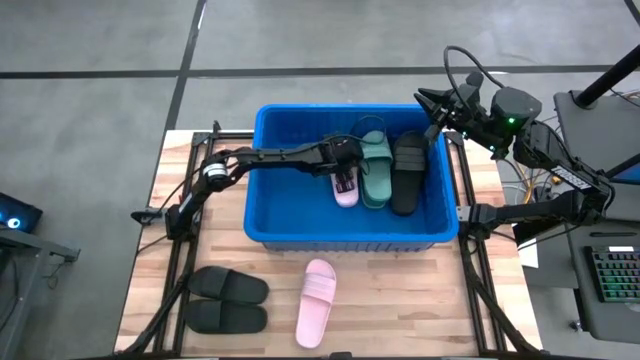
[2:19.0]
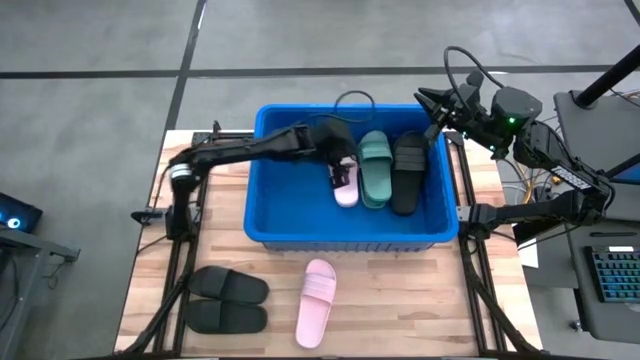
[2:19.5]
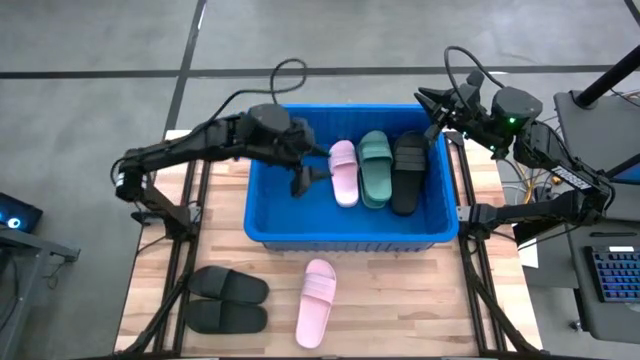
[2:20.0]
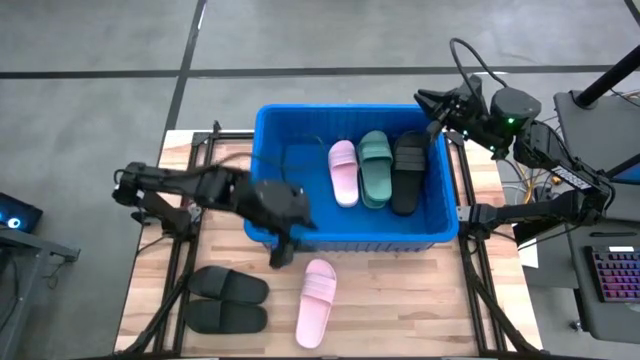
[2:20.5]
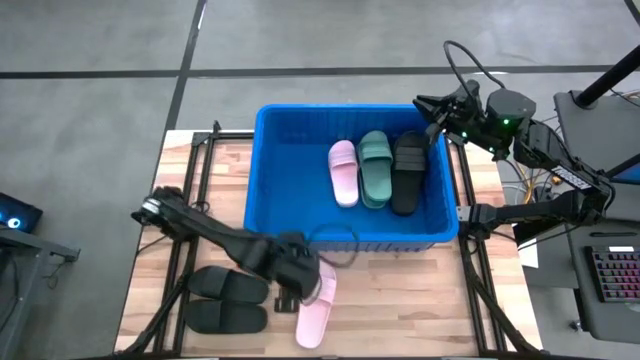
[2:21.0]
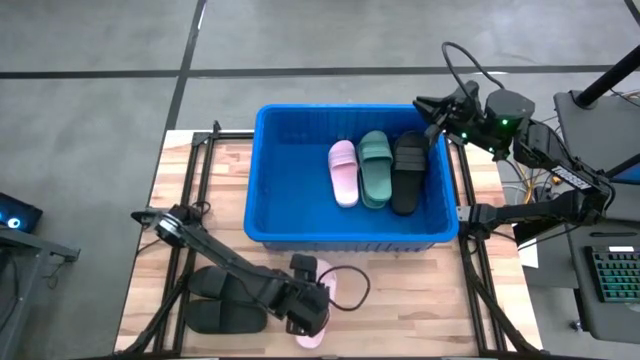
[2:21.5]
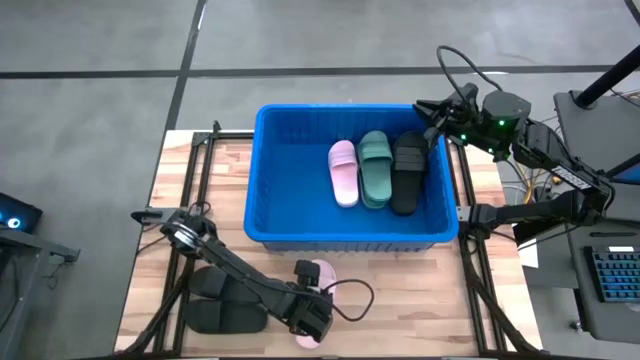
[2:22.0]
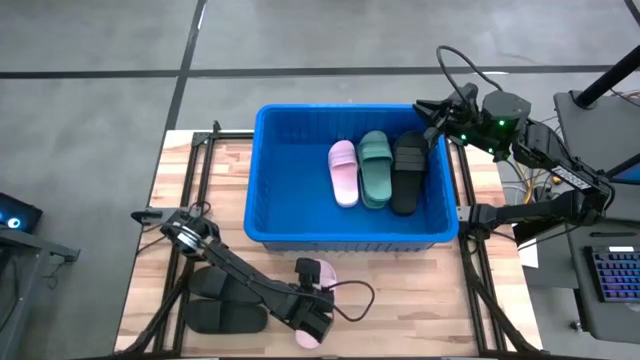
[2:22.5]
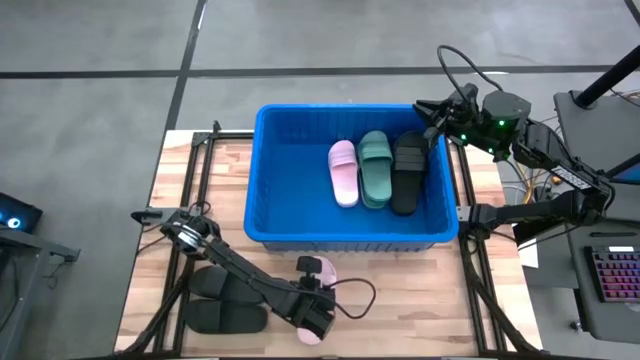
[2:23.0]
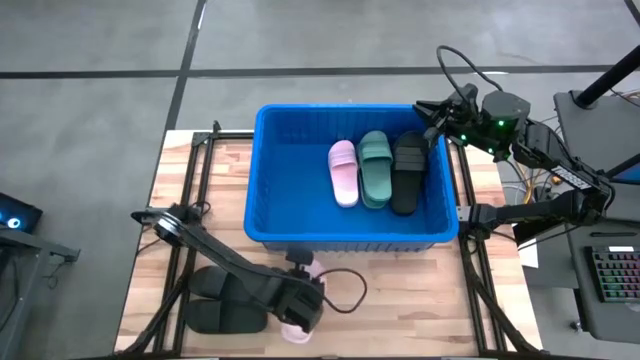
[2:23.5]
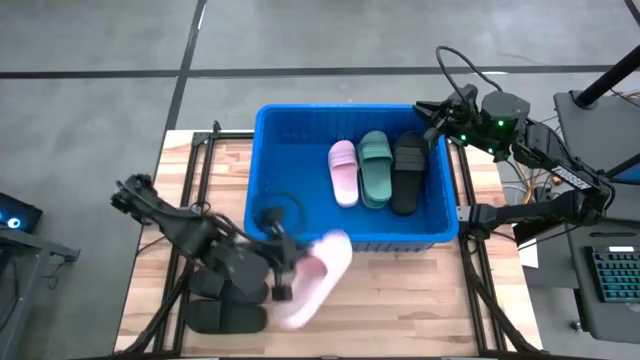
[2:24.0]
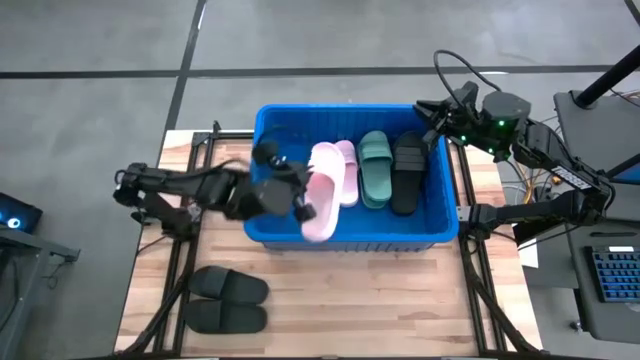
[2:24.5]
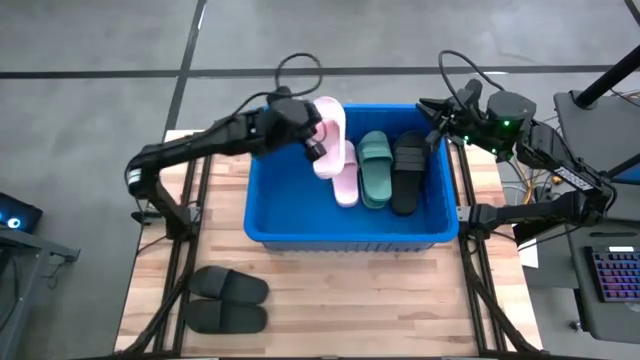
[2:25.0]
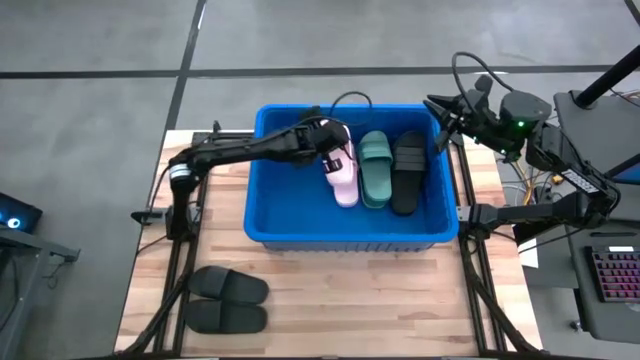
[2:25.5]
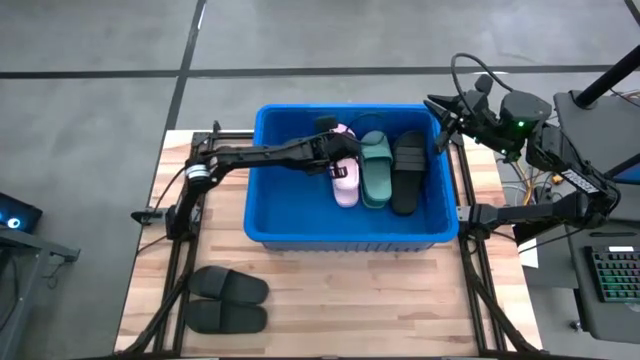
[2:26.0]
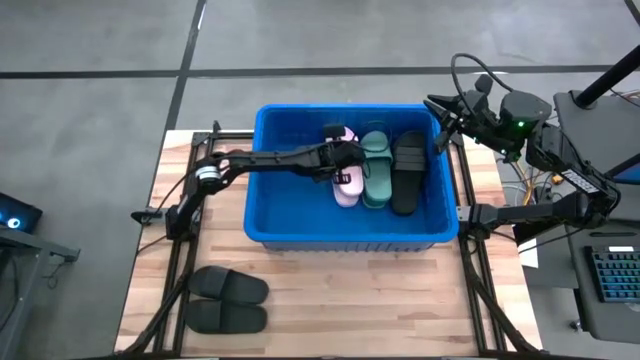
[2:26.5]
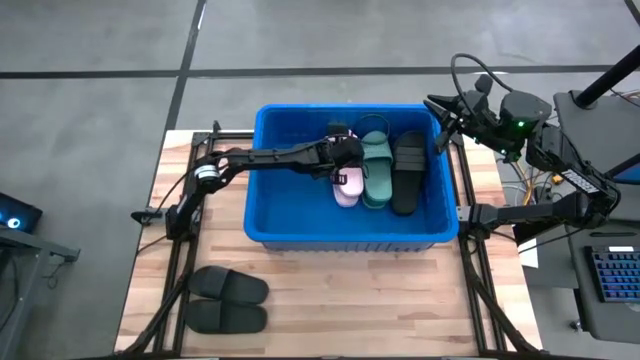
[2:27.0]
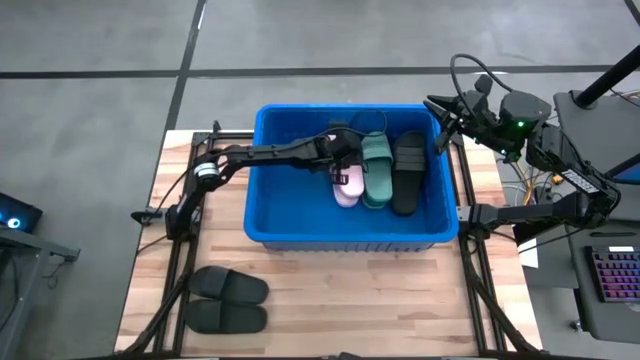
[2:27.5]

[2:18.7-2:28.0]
Task: Pick and place slides into bin
Put the pink slide into the blue bin

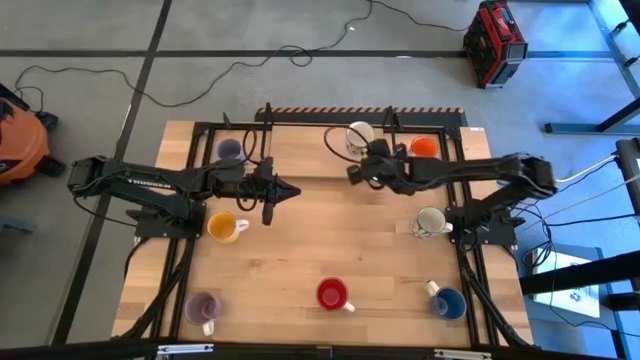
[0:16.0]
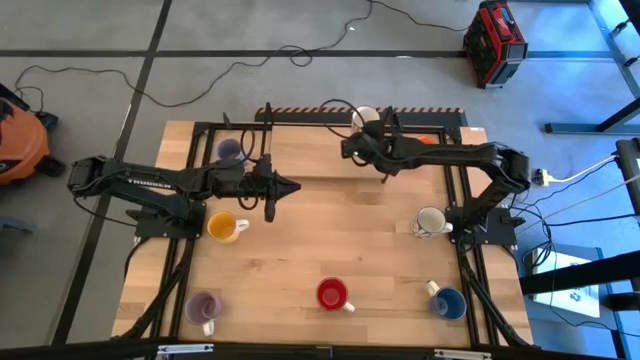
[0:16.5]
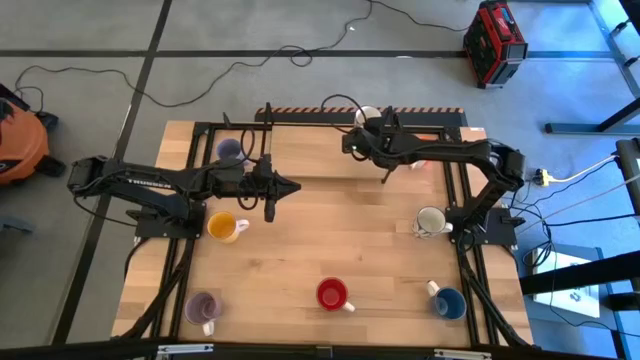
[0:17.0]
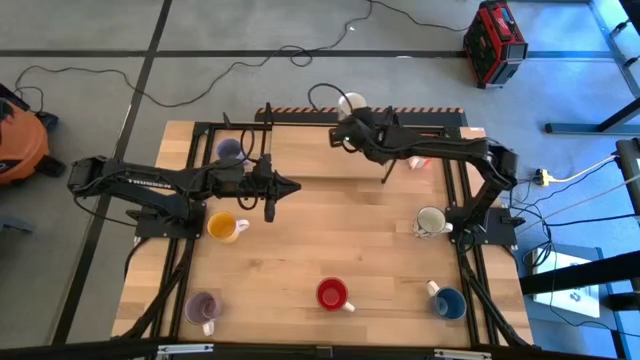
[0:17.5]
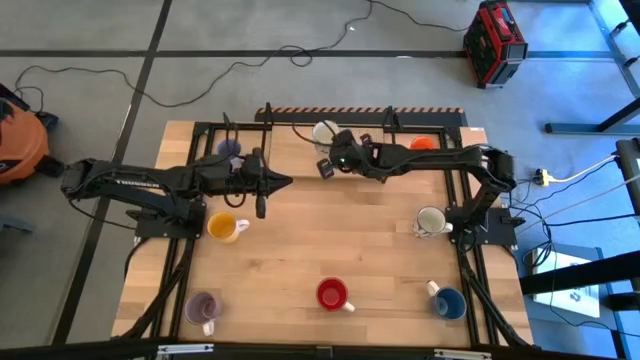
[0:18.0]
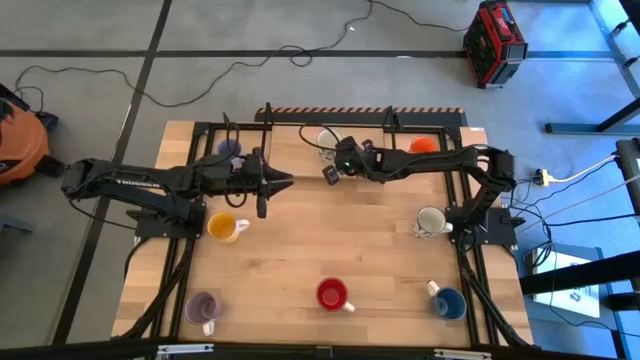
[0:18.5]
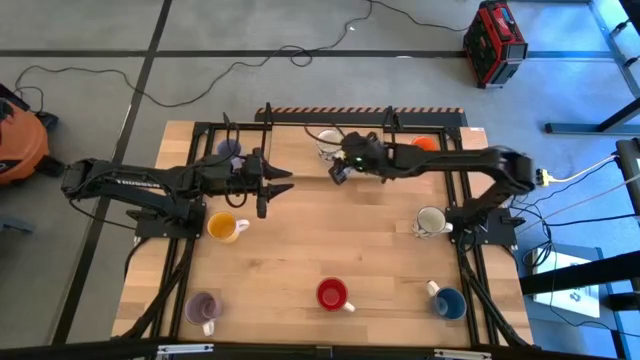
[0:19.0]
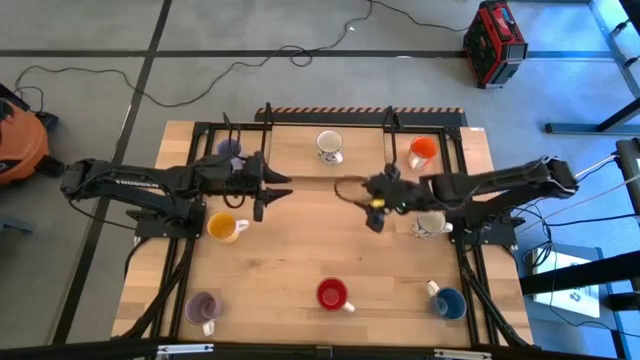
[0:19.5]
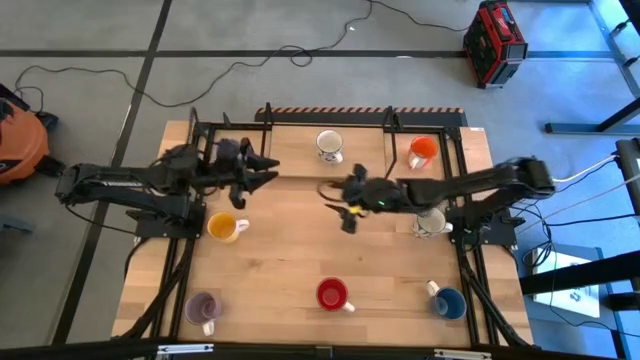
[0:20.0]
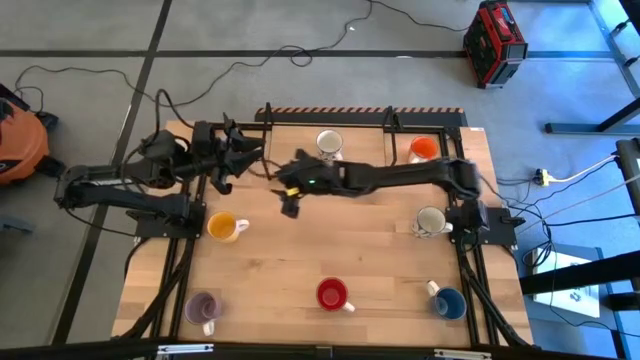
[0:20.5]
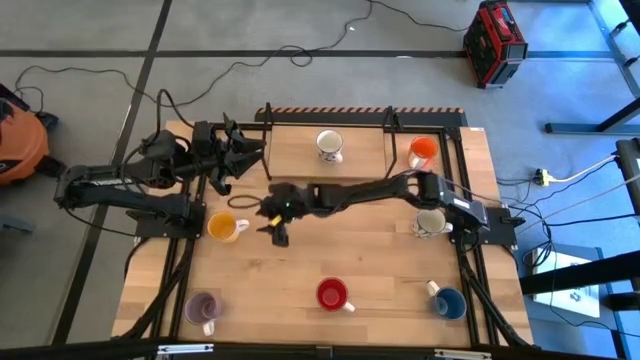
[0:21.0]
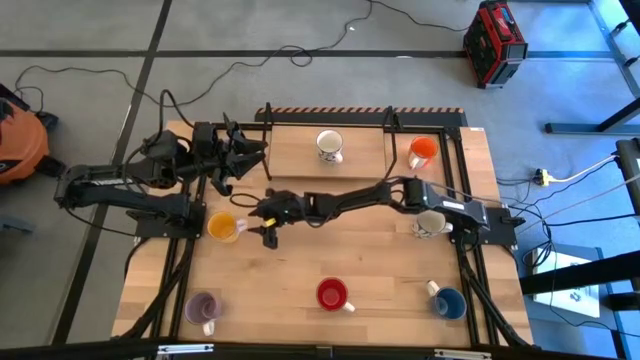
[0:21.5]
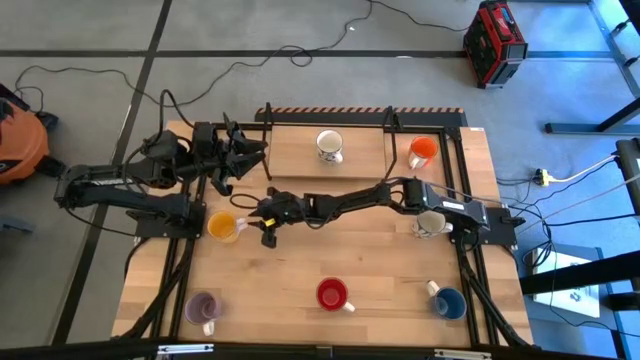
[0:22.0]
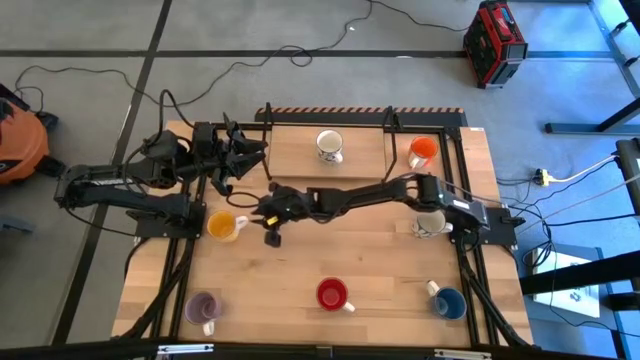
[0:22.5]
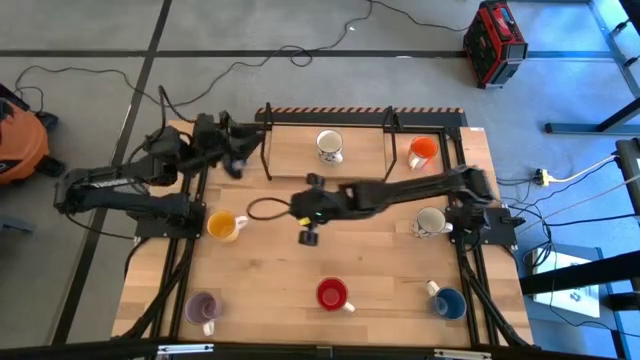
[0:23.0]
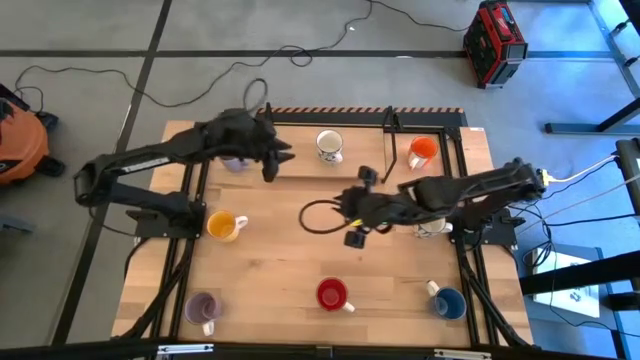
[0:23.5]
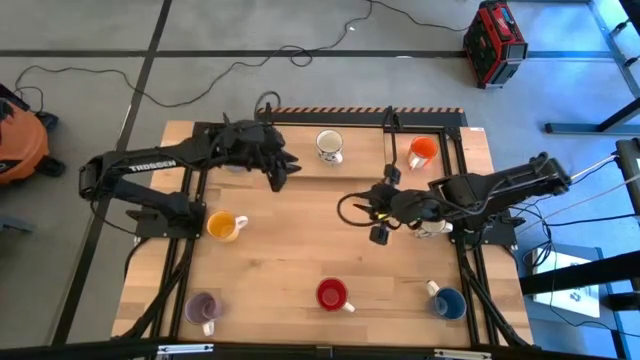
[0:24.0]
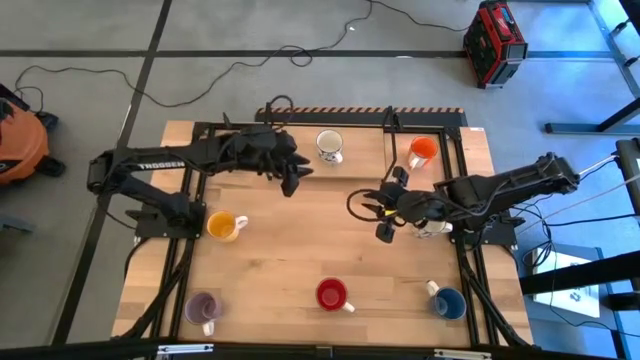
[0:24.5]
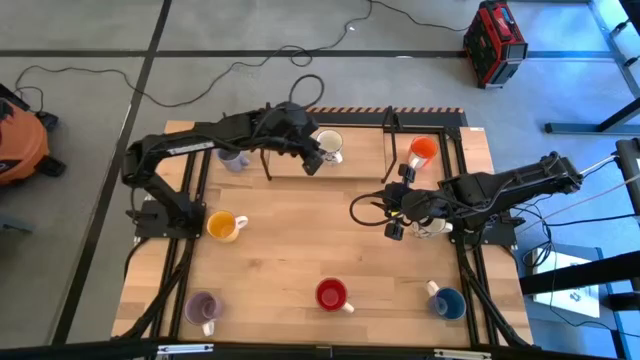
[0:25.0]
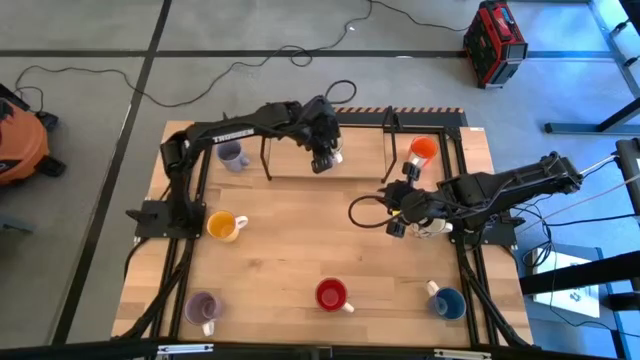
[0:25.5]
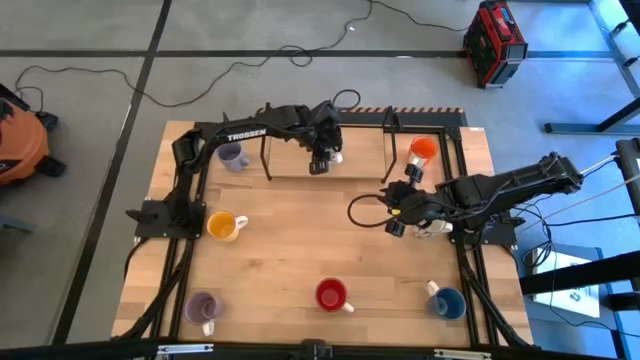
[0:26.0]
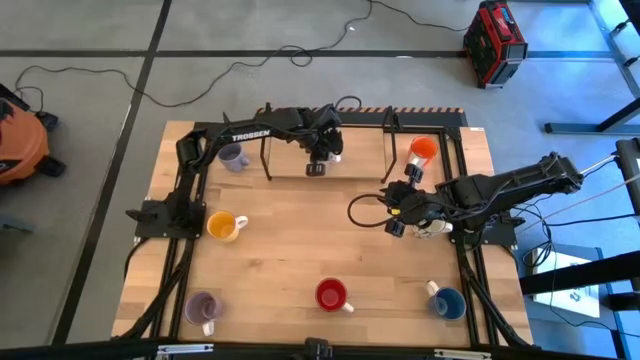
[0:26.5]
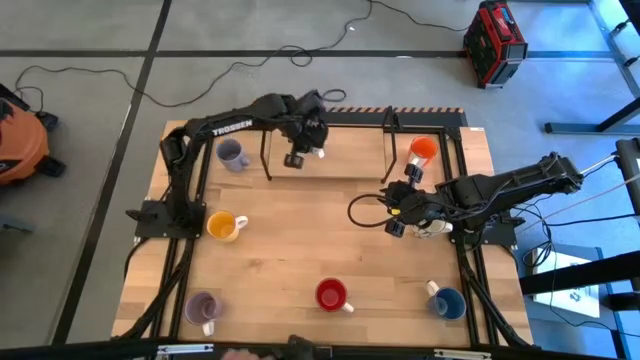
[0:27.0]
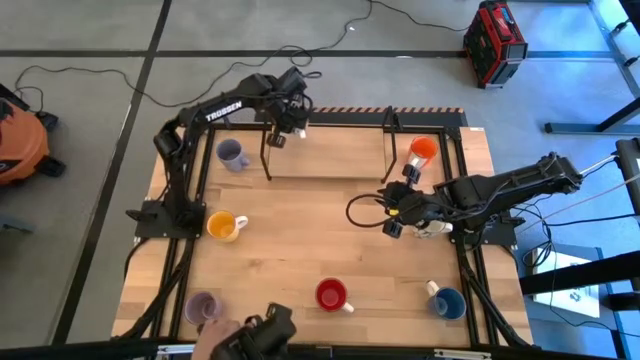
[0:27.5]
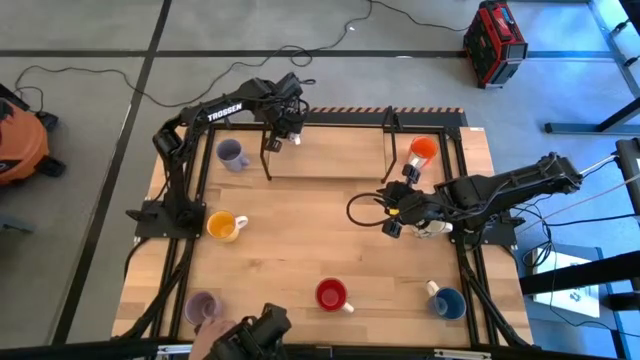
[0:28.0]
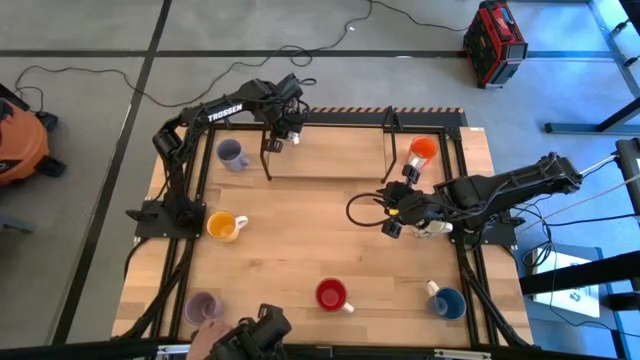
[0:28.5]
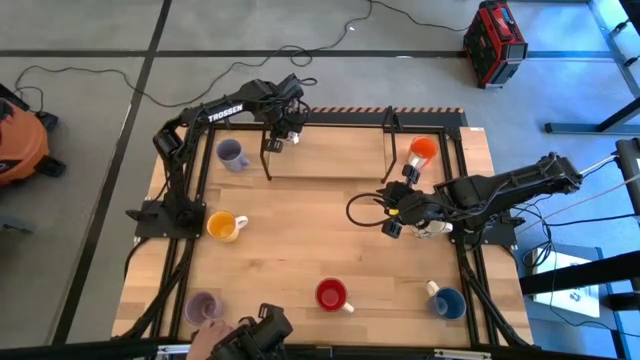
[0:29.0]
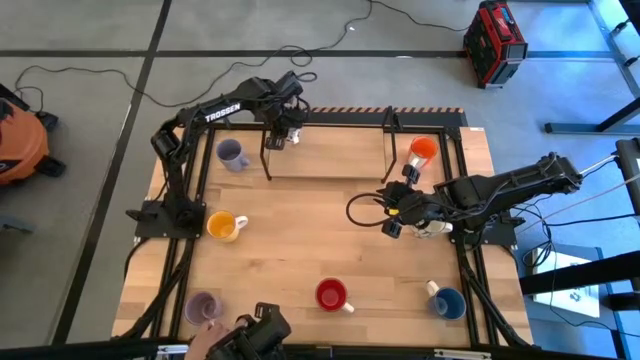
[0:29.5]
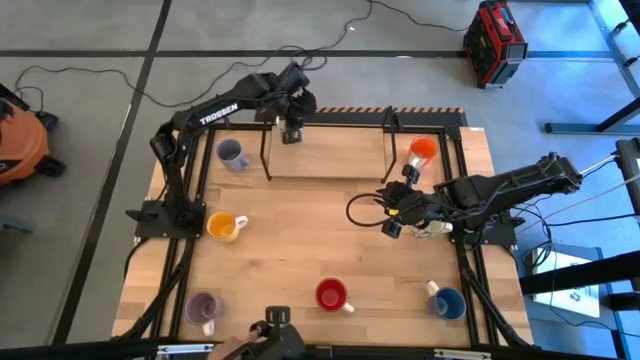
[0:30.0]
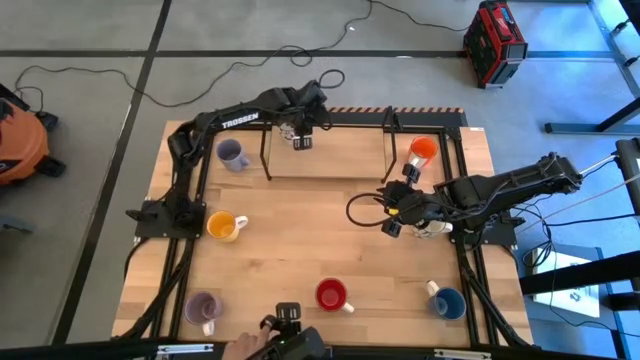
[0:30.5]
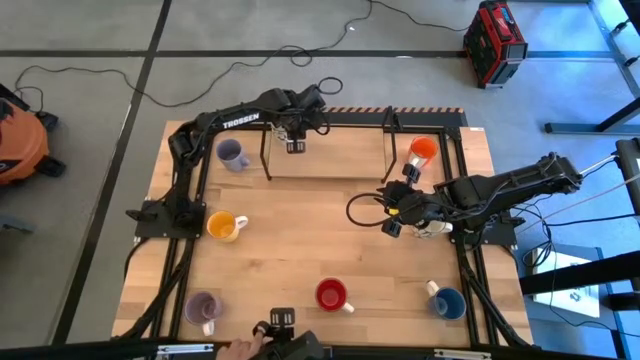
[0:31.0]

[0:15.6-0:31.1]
Task: Place coffee mugs
Put the top blue patterned mug on the shelf
